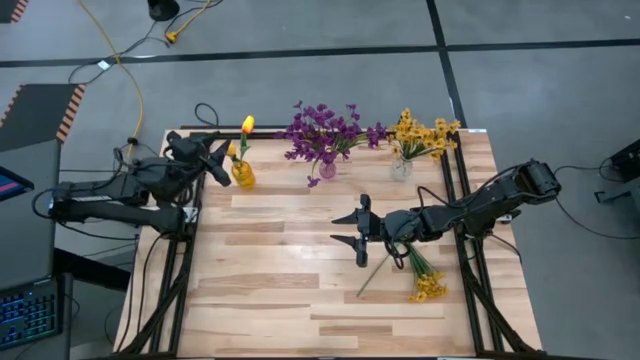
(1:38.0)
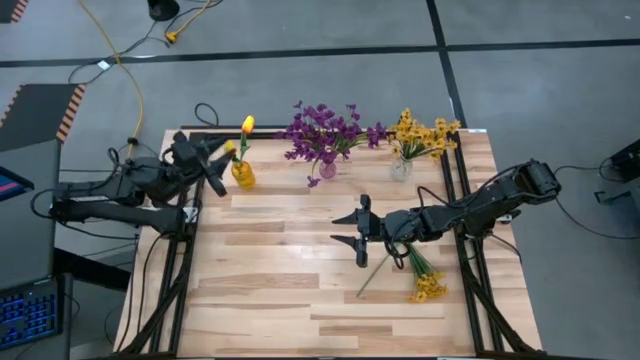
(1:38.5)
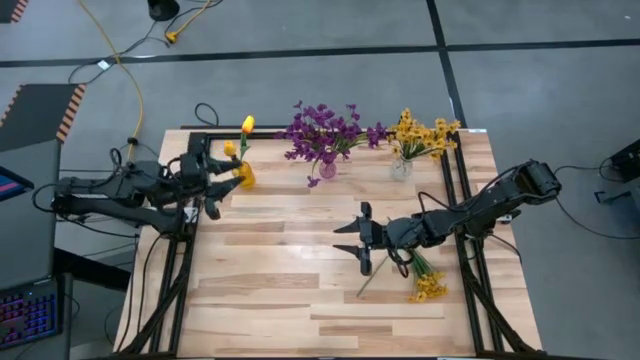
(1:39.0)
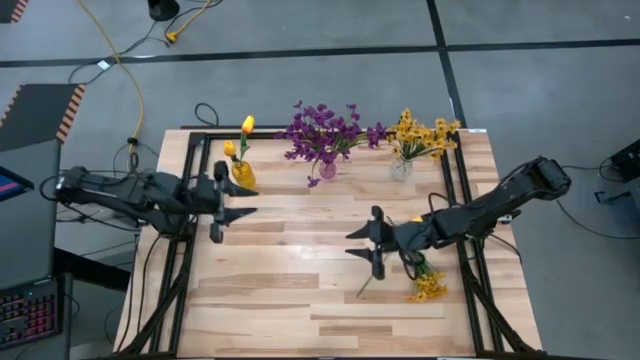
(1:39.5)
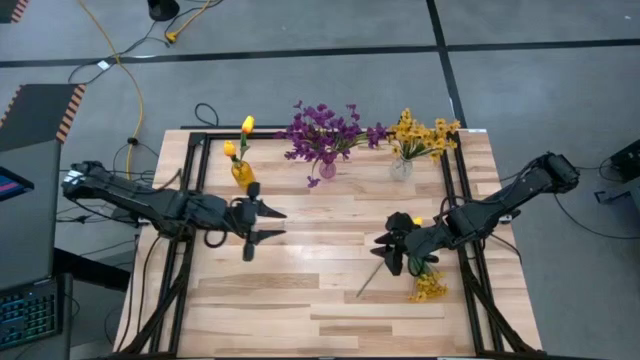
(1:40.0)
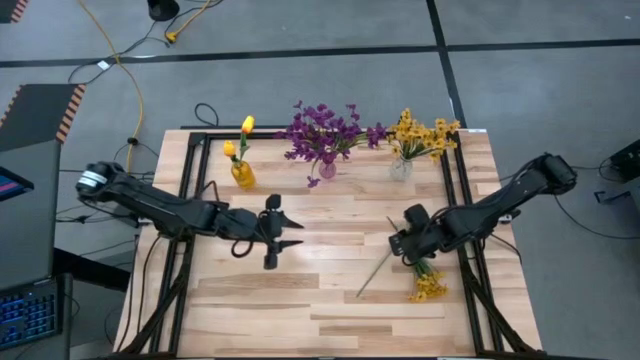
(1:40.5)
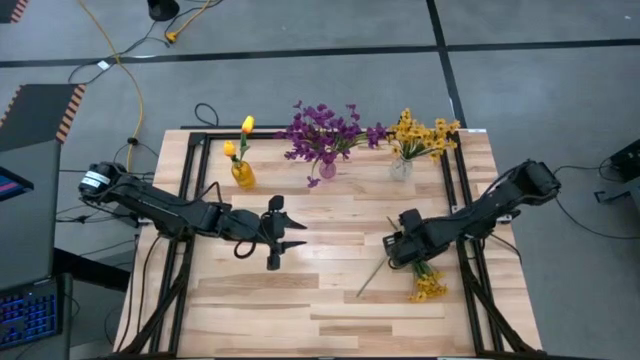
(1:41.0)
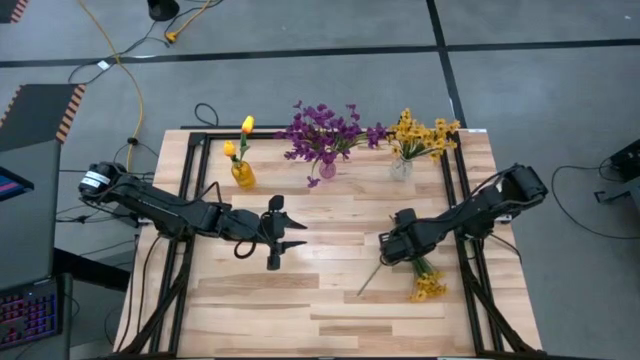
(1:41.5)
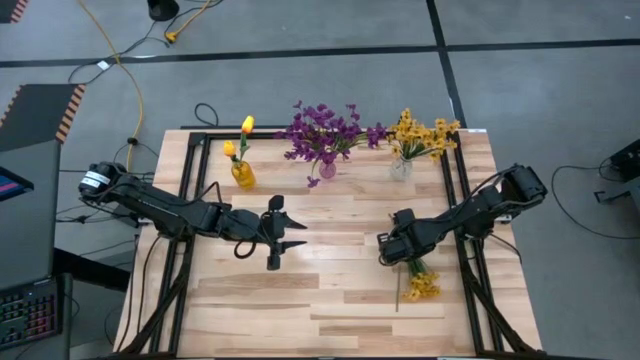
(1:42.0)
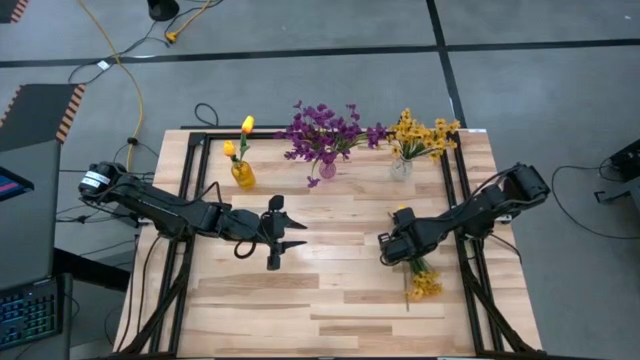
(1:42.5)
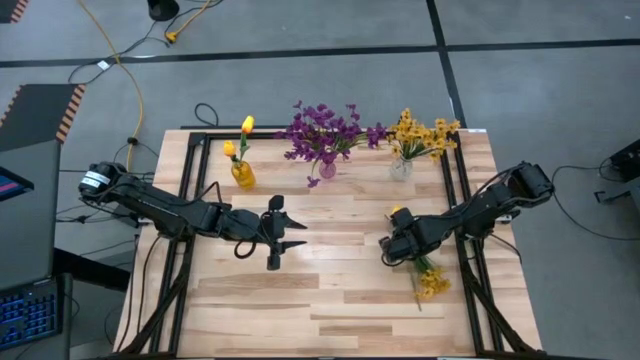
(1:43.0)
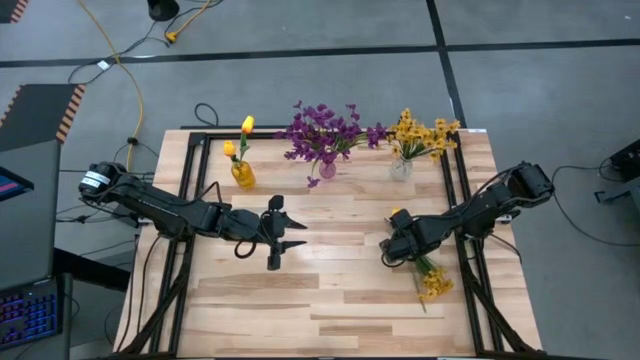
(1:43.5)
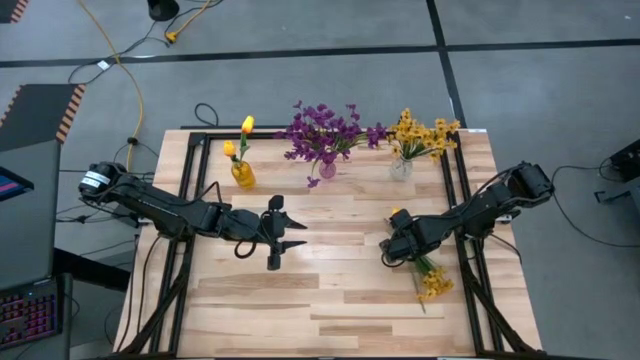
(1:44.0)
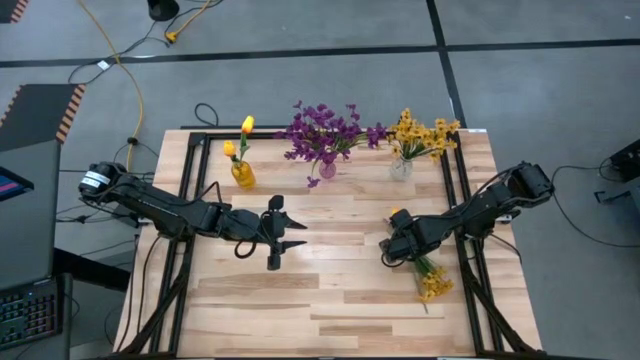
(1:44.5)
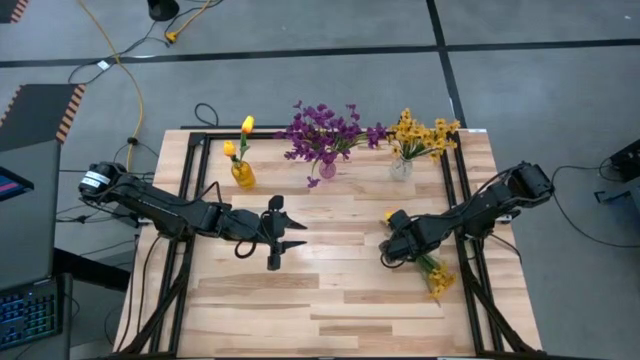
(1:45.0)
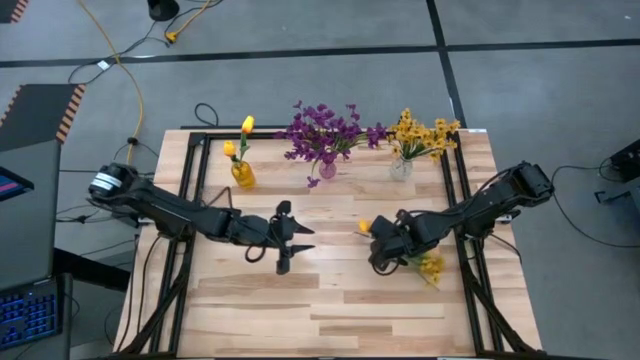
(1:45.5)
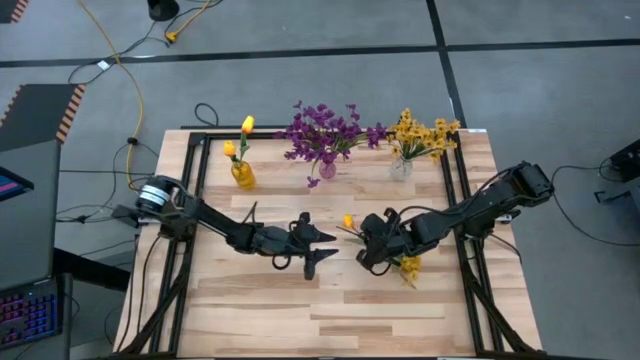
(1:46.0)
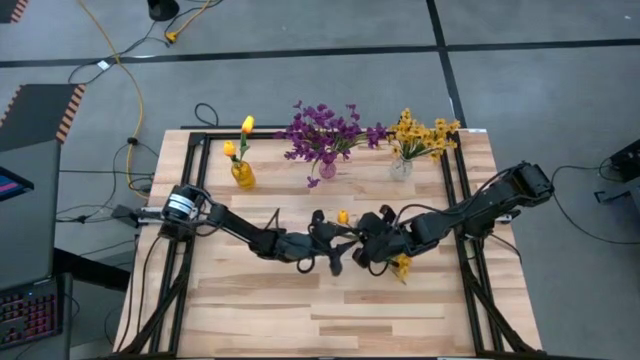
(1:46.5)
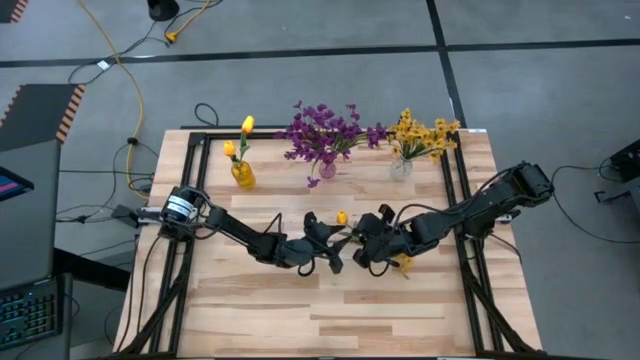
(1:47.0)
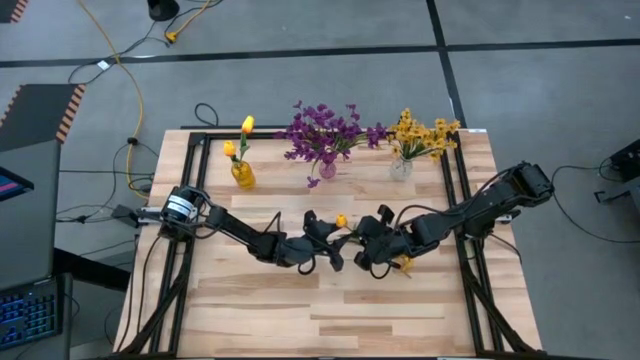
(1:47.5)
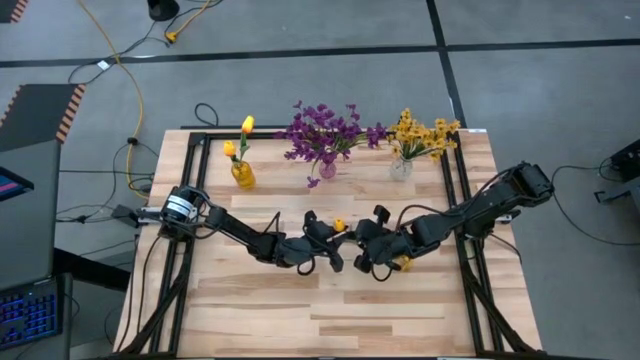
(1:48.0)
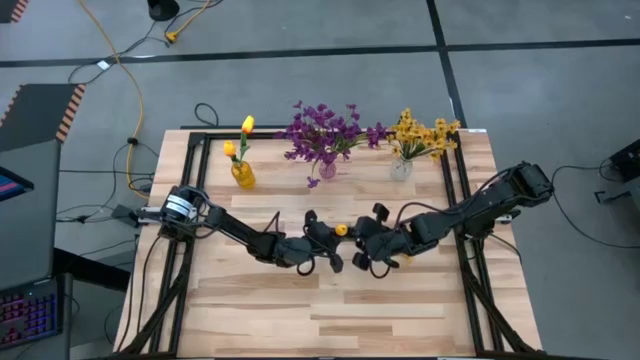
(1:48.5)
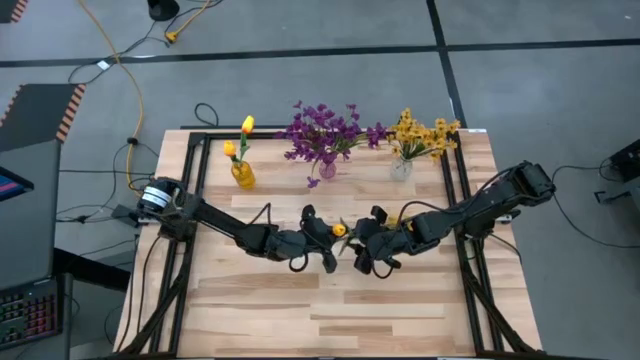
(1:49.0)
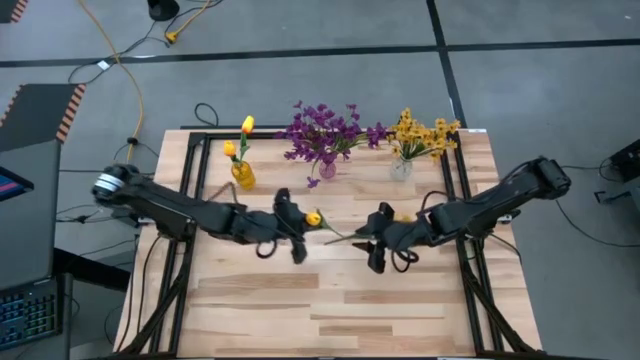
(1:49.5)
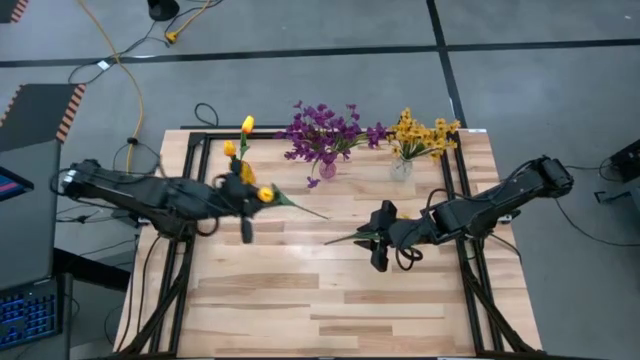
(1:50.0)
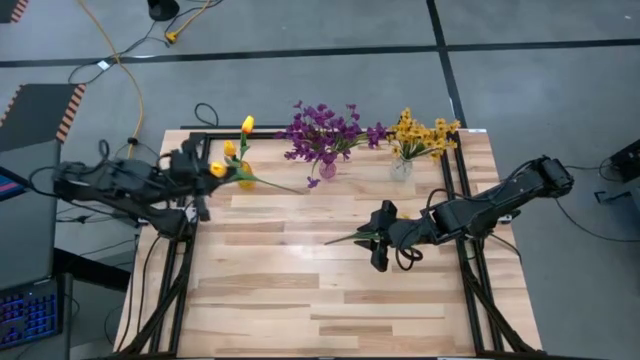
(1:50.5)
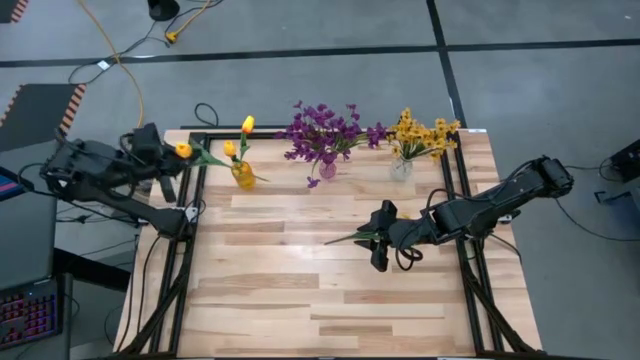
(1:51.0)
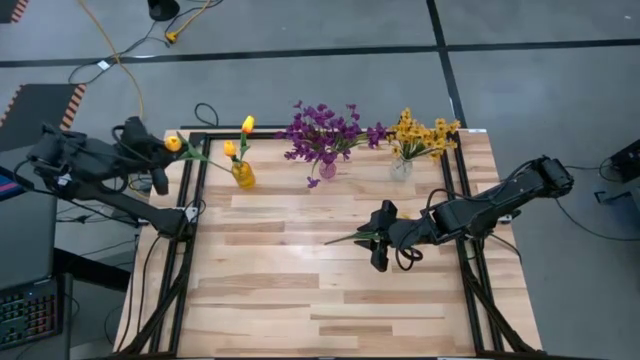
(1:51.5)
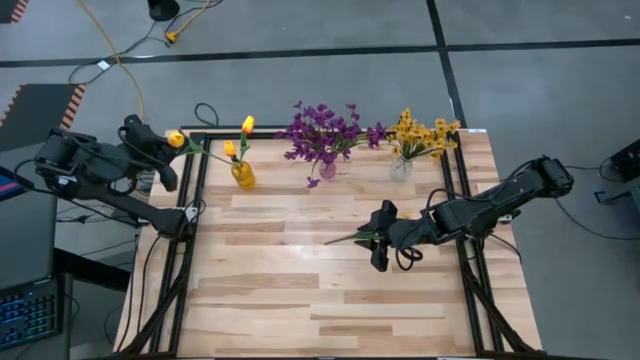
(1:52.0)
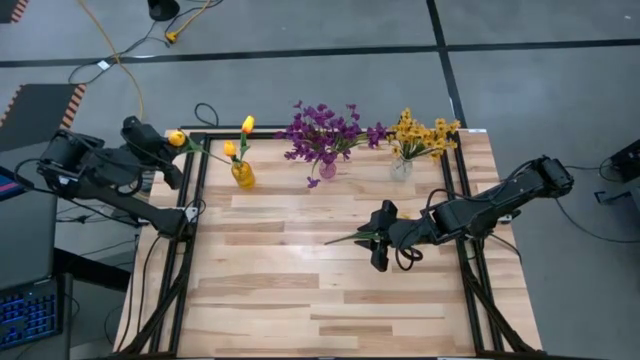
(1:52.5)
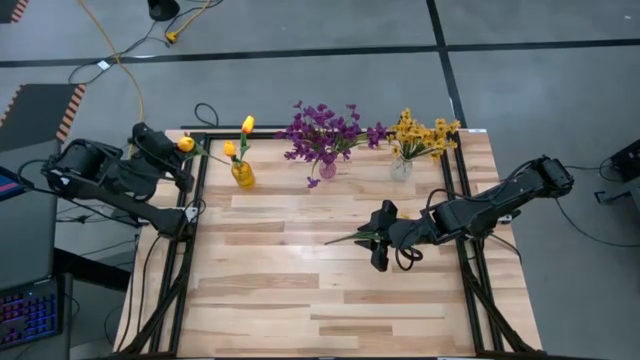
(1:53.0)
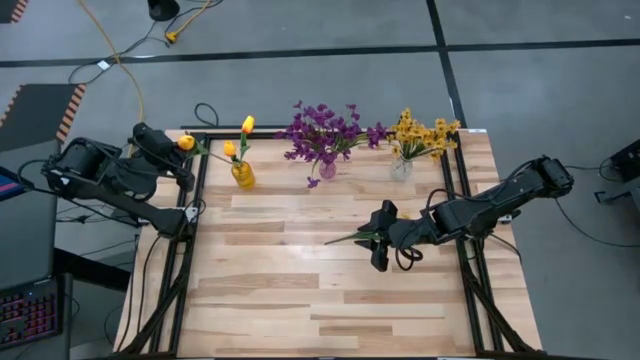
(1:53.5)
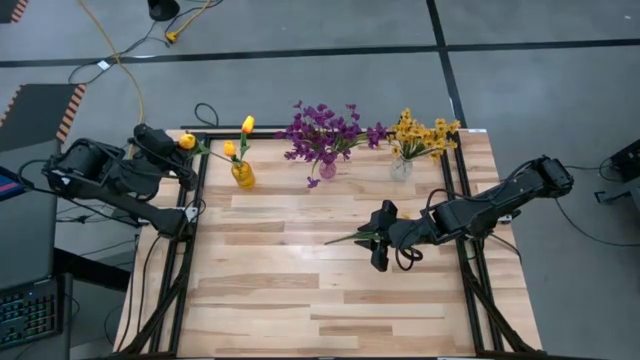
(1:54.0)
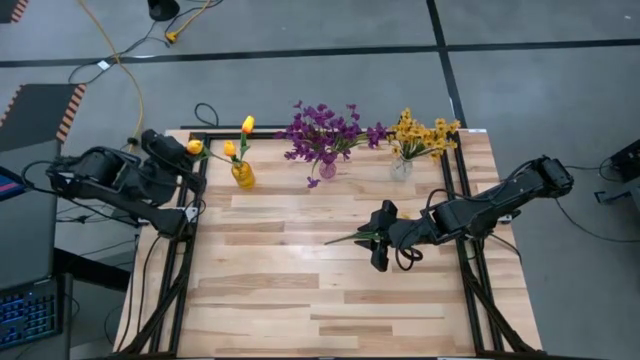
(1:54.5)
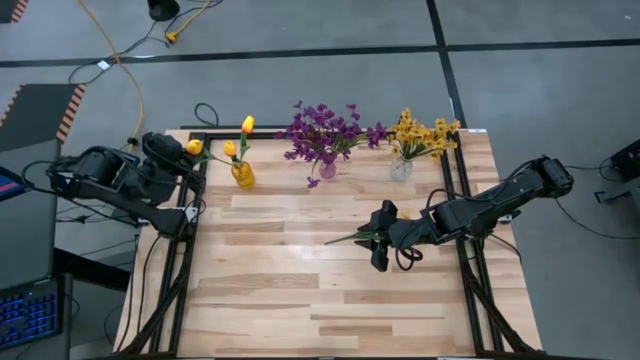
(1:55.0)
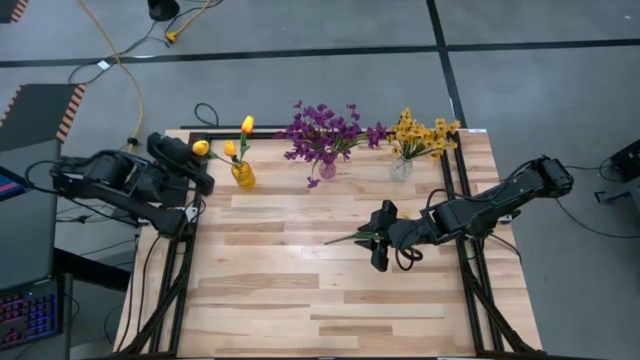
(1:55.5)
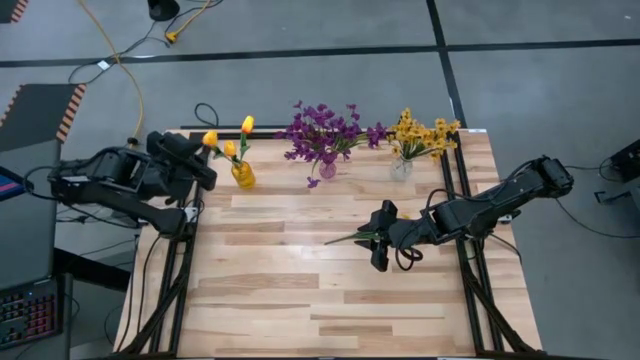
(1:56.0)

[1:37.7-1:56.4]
Task: Sort flowers into vase by color
Put the yellow tulip into the yellow vase

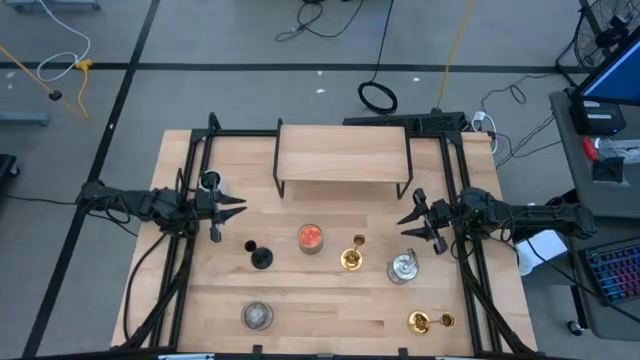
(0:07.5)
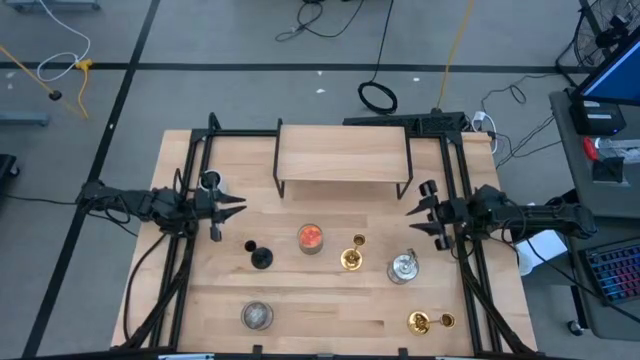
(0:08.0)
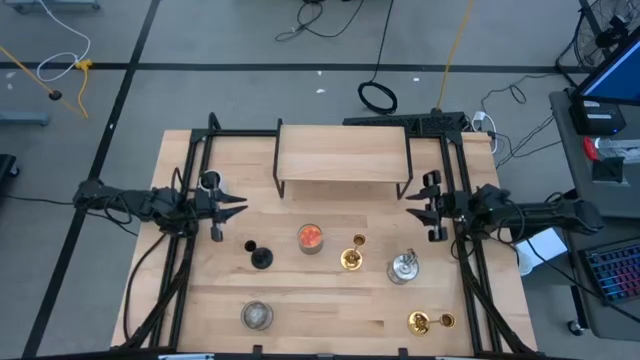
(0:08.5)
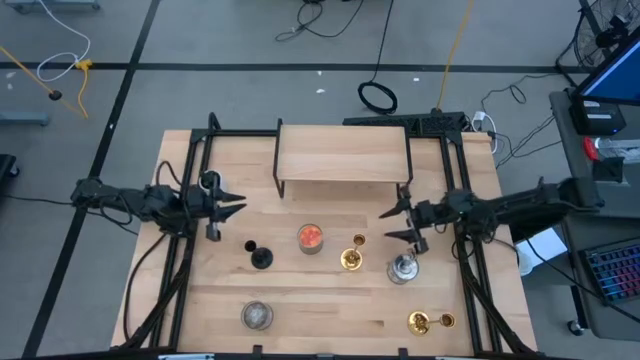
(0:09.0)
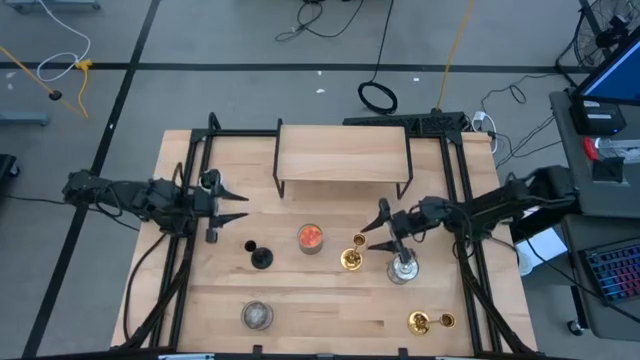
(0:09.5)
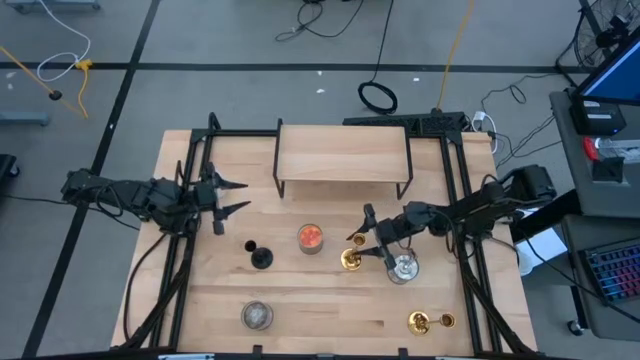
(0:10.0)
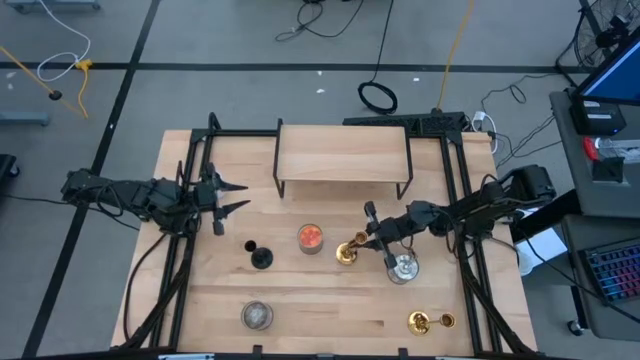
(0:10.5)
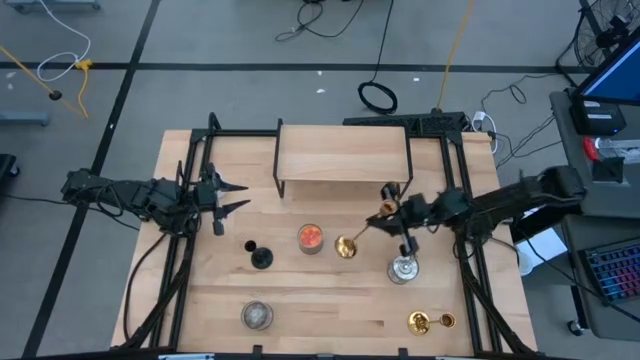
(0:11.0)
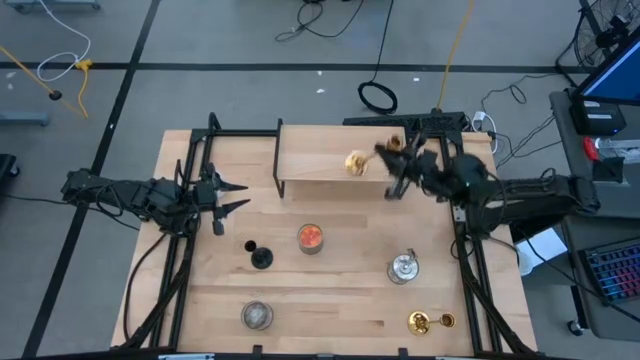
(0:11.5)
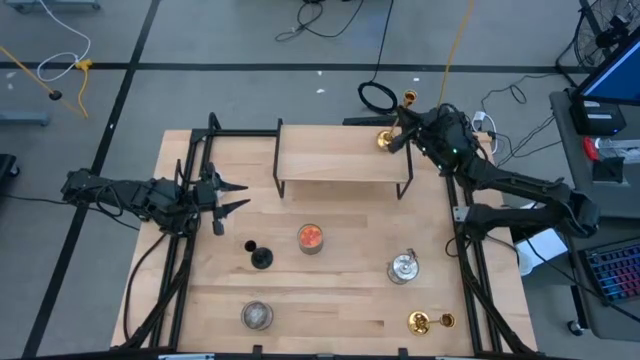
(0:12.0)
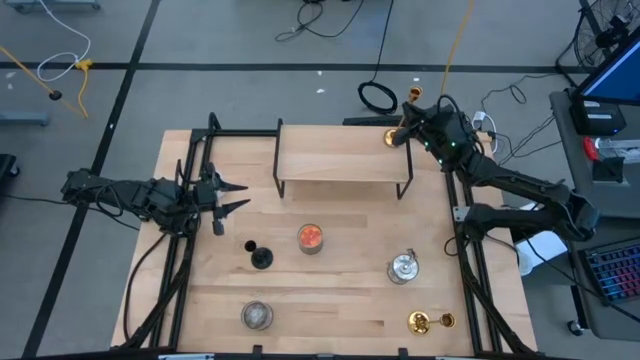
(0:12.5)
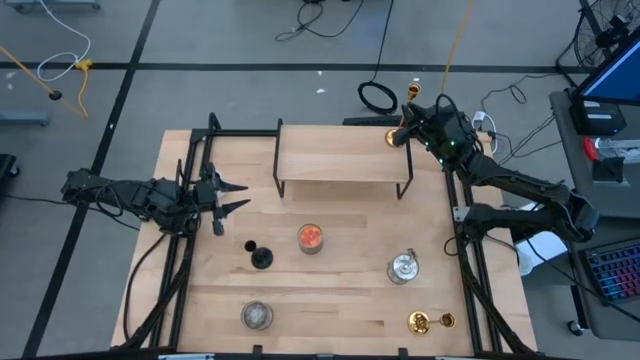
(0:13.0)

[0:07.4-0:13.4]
Task: Pick & Place candle stick holders
Put the middle golden candle holder on the shelf
